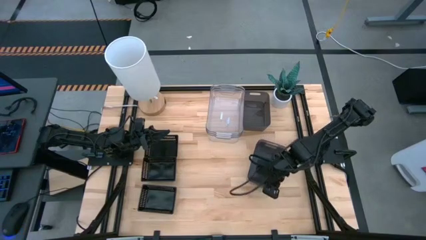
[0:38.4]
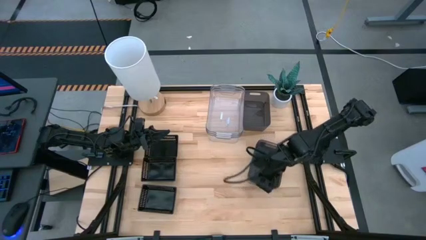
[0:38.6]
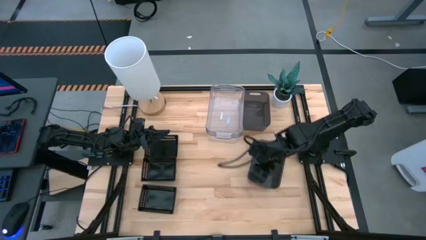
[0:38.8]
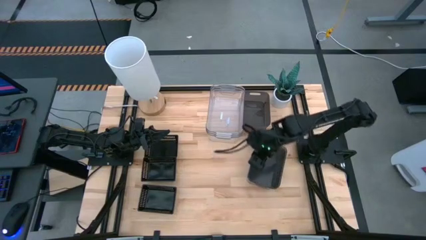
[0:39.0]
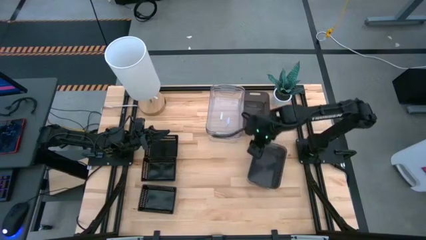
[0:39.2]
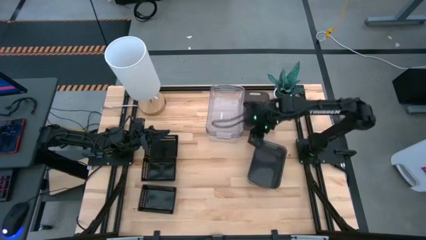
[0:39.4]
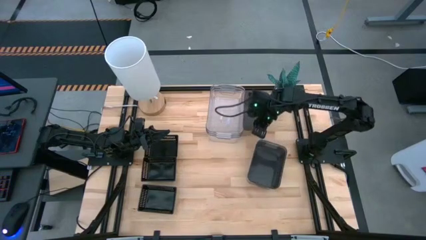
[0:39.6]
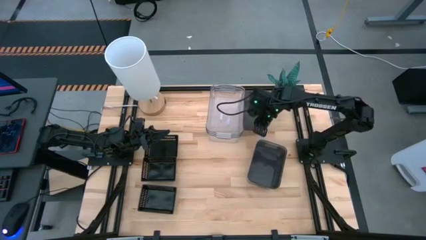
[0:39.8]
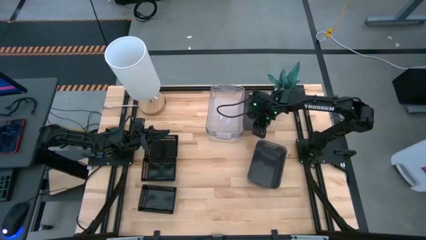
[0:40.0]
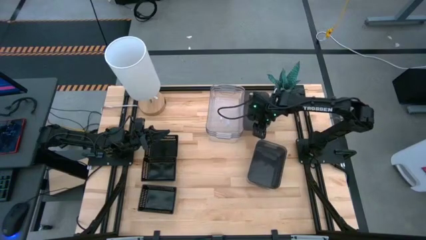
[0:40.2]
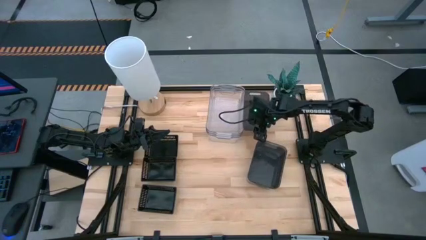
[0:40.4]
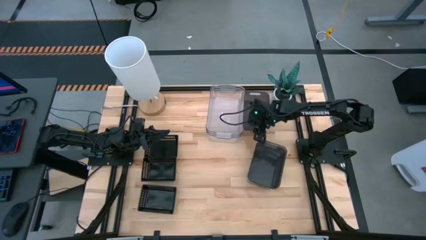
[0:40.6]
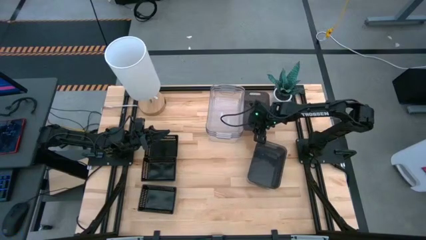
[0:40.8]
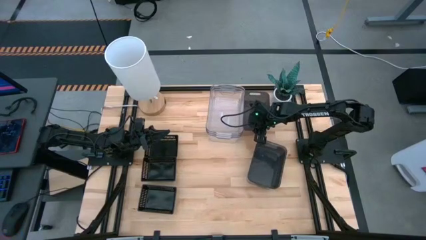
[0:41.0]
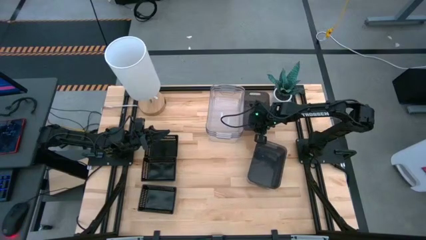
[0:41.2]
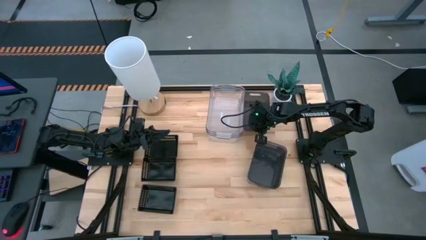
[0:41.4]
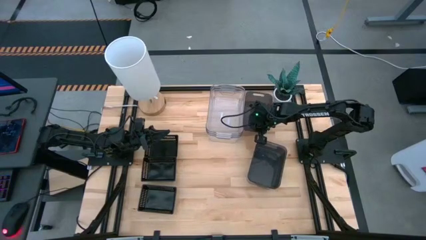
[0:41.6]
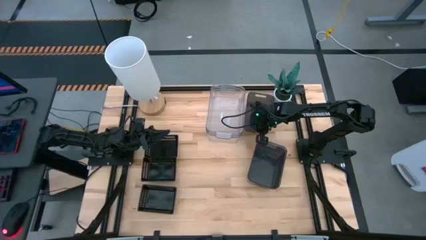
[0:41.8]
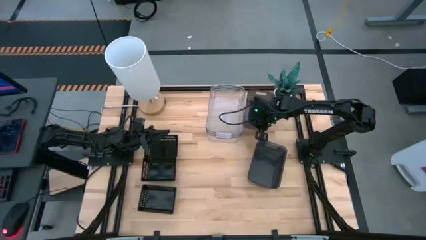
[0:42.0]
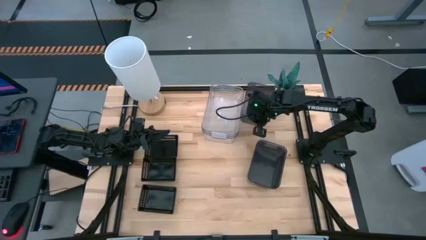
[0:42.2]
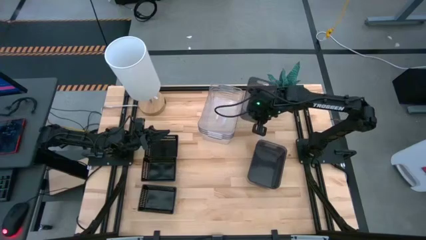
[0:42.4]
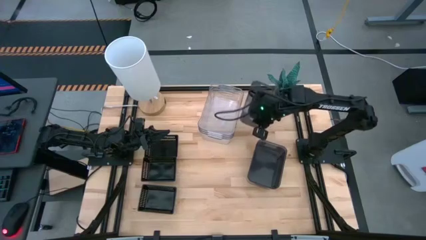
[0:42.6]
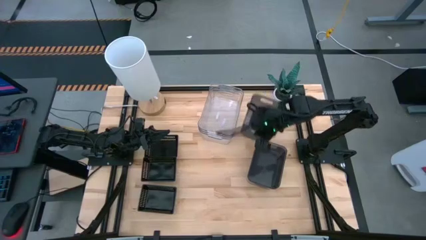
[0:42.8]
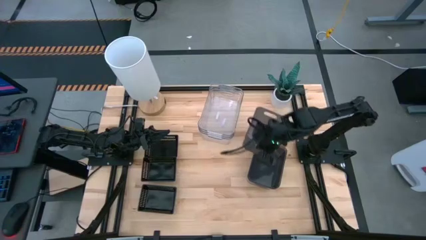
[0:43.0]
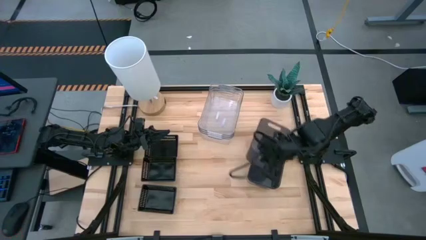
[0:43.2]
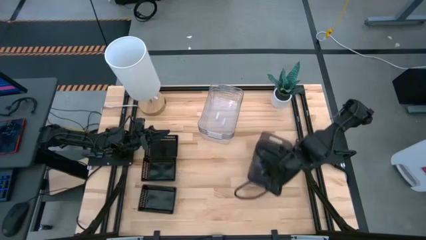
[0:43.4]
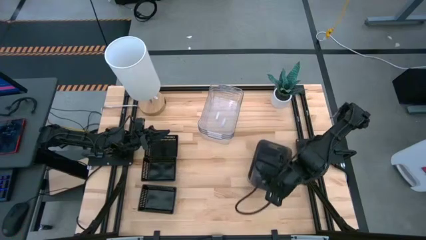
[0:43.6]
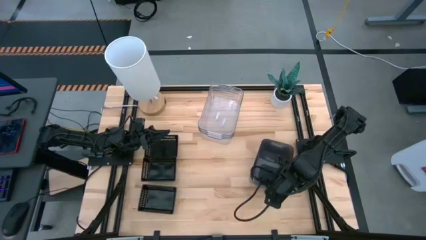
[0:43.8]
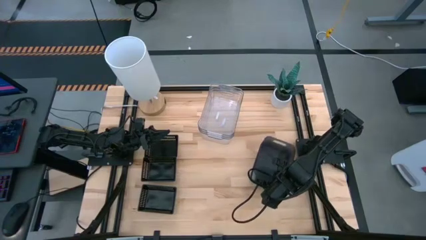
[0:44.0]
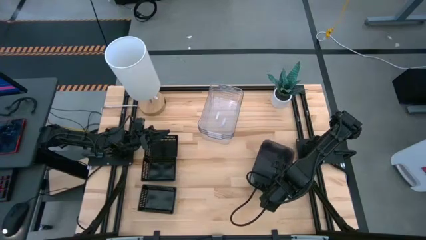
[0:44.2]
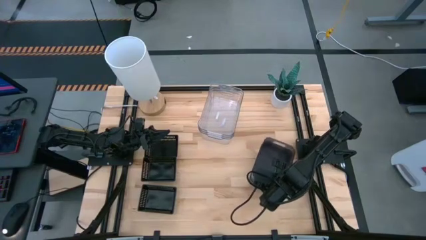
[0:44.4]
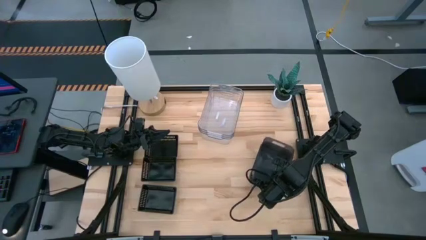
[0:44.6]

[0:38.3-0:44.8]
Stack the top black bin on top of the bottom black bins

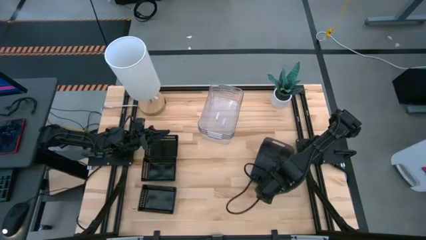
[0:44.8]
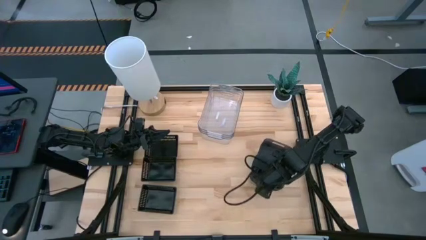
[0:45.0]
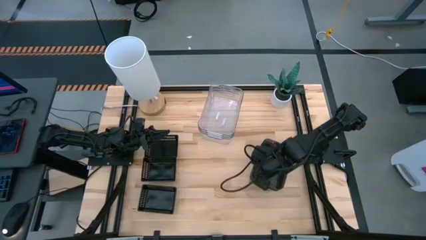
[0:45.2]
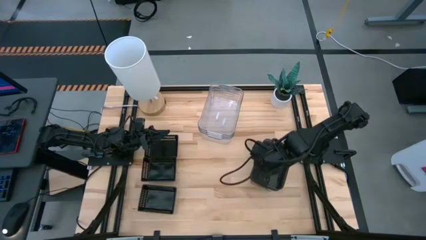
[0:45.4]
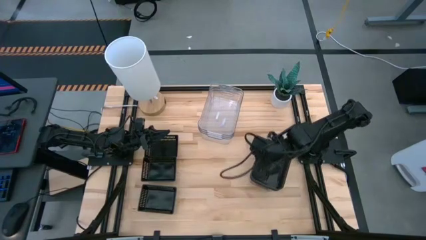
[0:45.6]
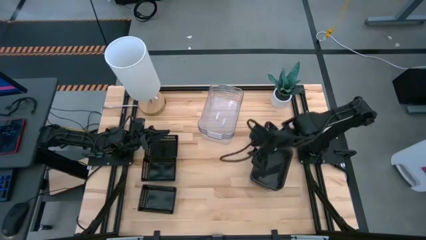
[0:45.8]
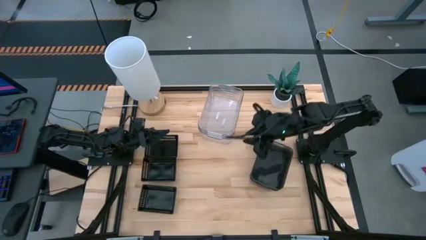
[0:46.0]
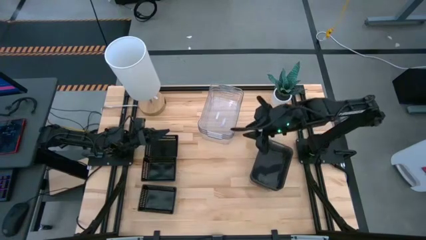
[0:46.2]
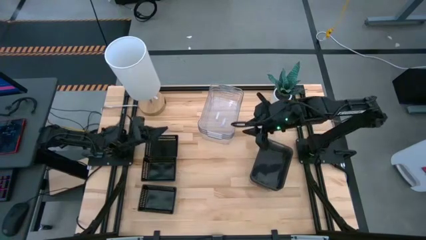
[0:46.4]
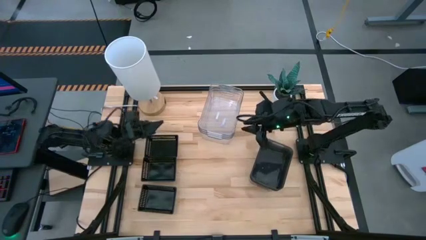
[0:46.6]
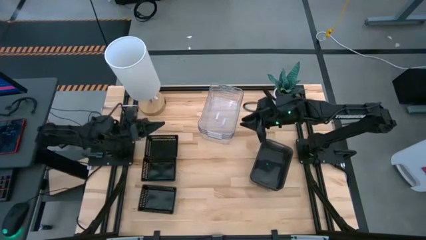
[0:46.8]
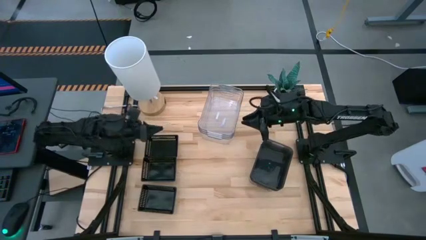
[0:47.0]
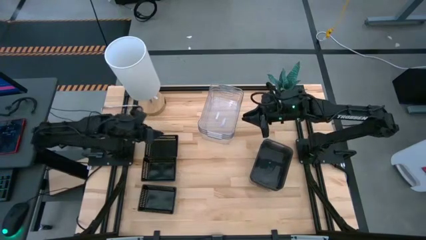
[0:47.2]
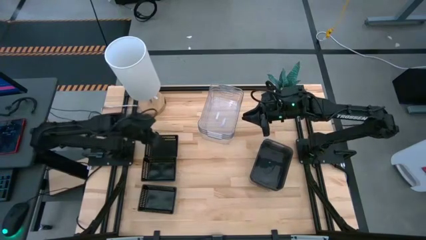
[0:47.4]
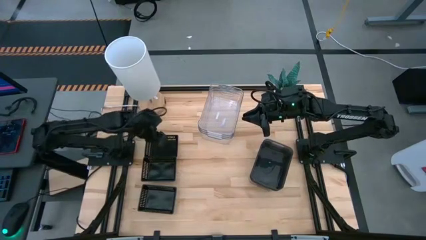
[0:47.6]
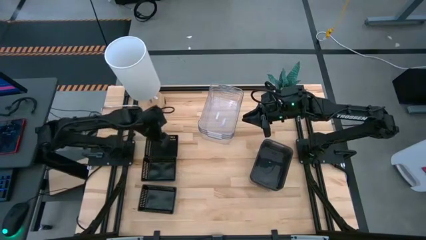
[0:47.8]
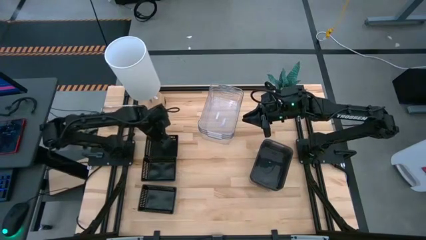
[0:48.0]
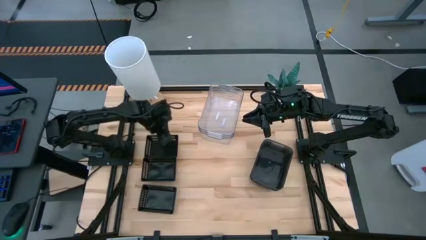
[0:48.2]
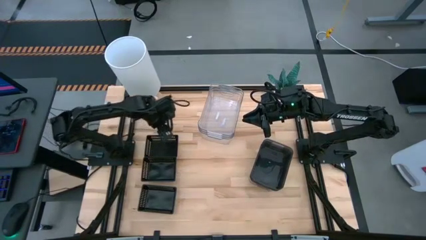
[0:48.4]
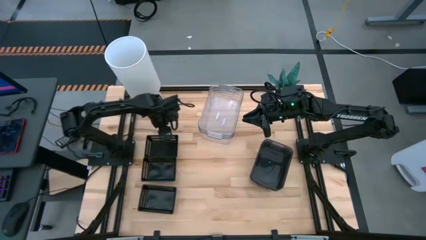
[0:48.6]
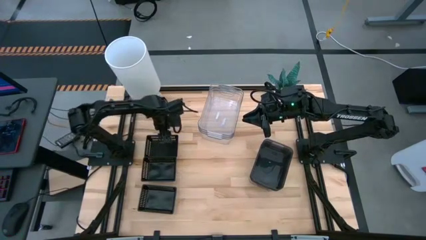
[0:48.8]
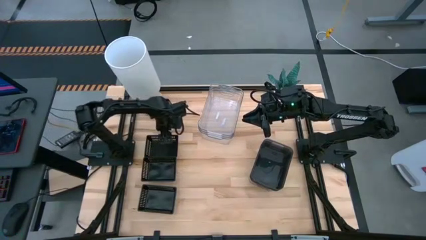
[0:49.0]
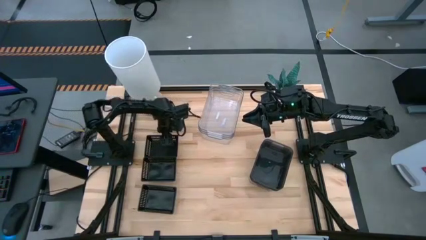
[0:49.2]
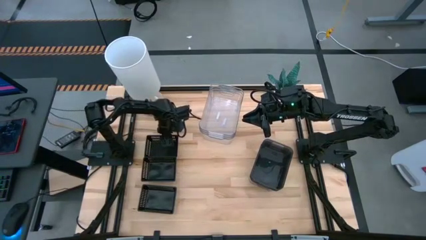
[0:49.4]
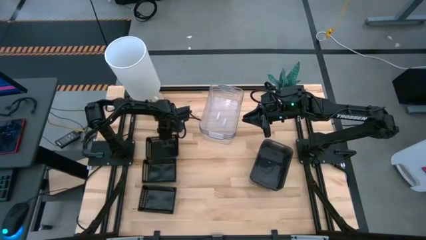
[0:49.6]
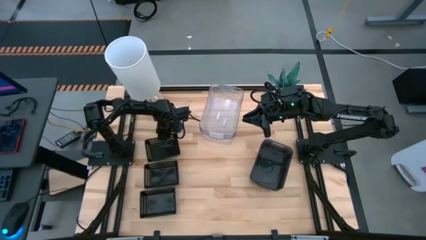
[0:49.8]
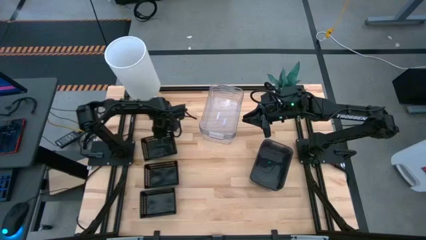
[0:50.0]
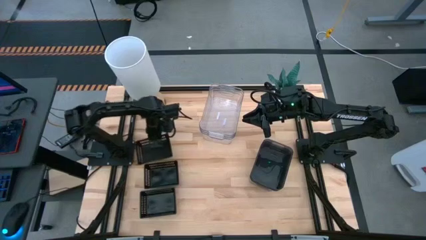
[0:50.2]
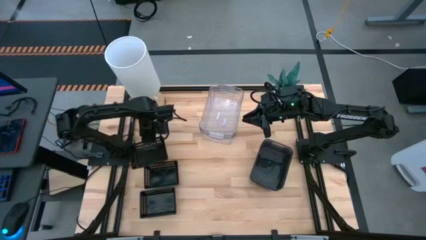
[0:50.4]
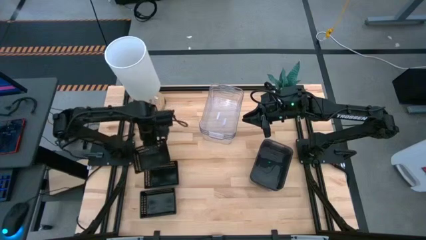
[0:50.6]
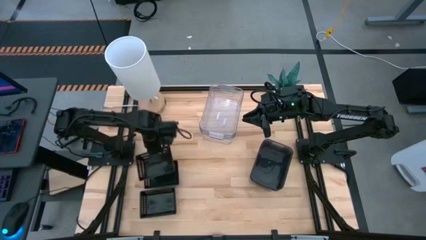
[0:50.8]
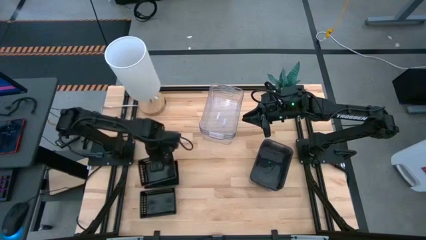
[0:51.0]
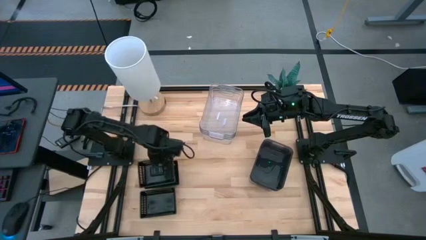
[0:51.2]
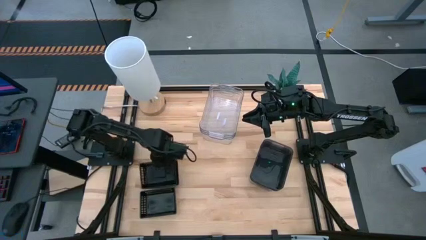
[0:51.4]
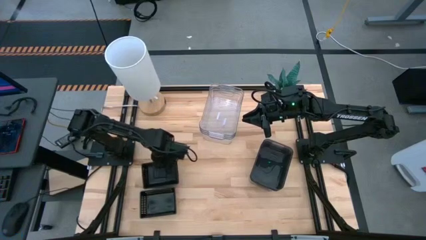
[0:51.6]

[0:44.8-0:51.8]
Stack the top black basket on top of the middle black basket

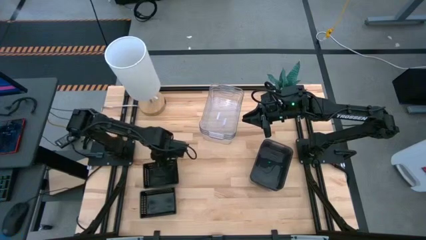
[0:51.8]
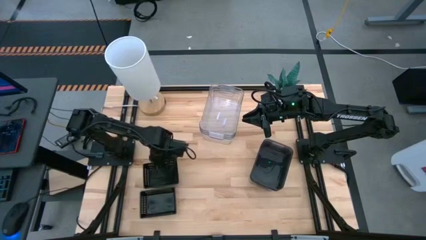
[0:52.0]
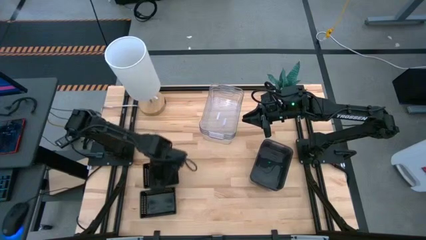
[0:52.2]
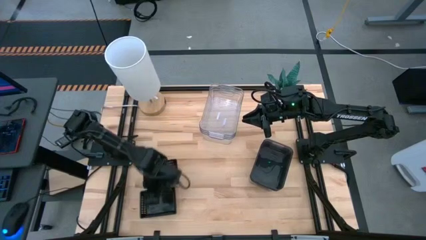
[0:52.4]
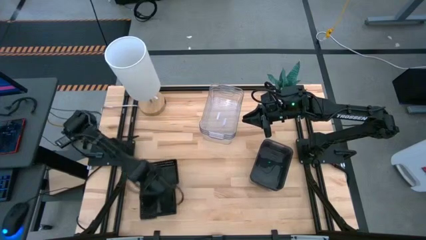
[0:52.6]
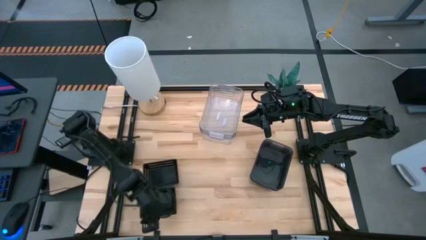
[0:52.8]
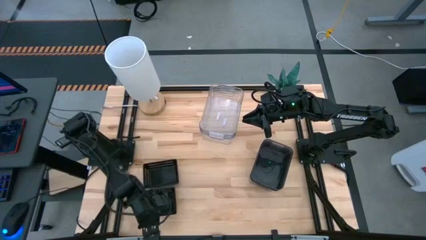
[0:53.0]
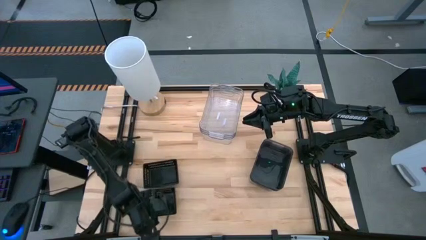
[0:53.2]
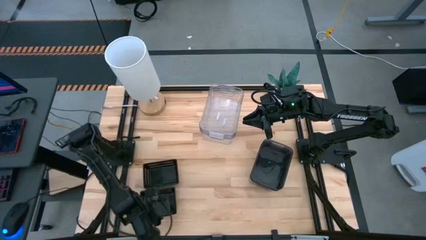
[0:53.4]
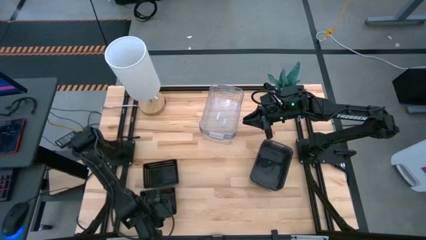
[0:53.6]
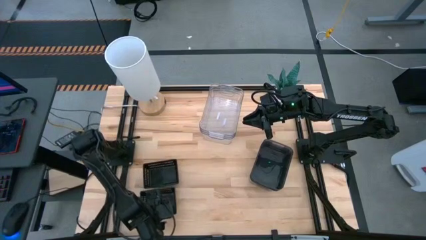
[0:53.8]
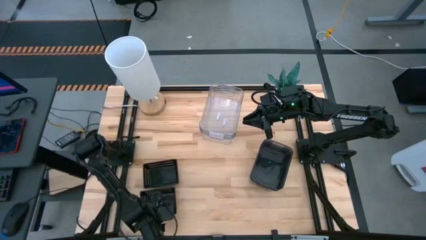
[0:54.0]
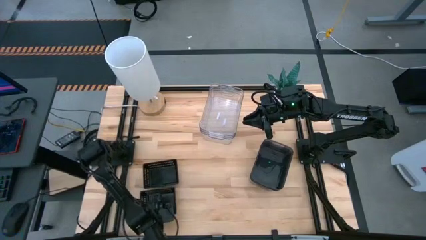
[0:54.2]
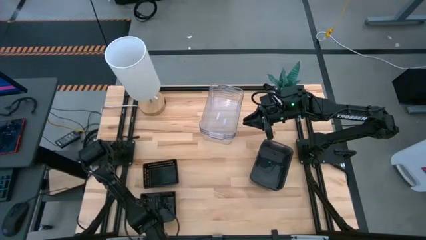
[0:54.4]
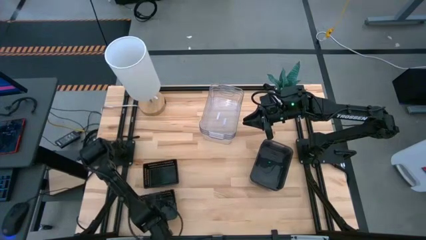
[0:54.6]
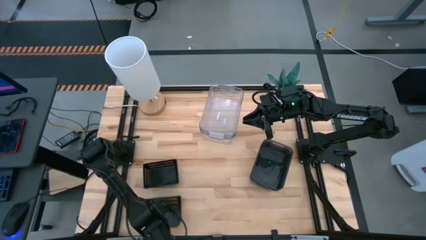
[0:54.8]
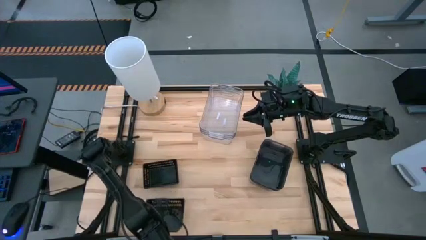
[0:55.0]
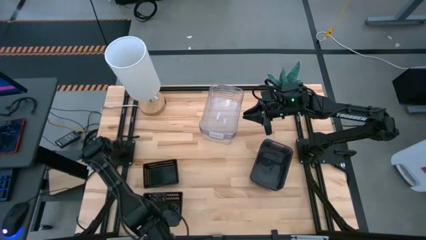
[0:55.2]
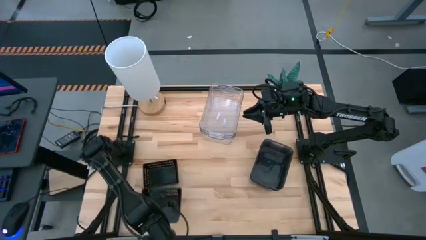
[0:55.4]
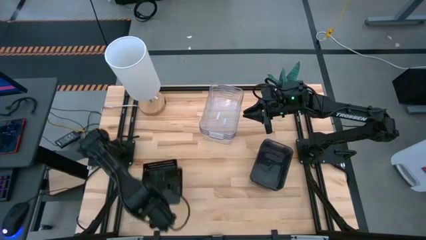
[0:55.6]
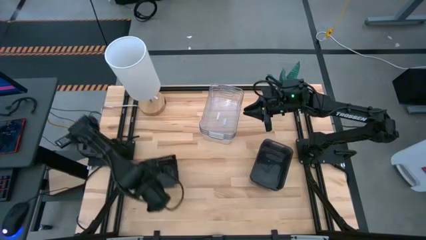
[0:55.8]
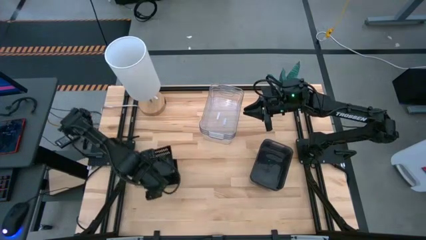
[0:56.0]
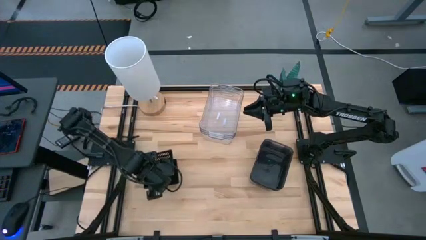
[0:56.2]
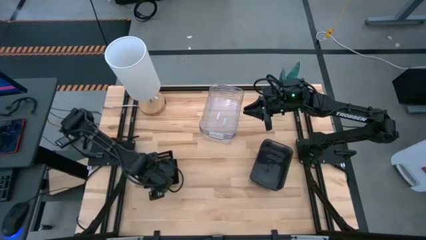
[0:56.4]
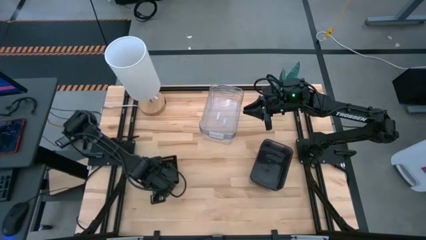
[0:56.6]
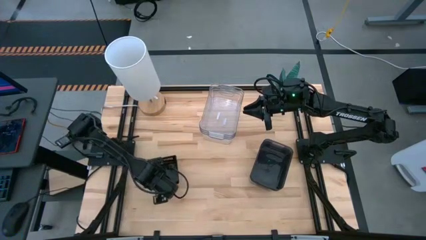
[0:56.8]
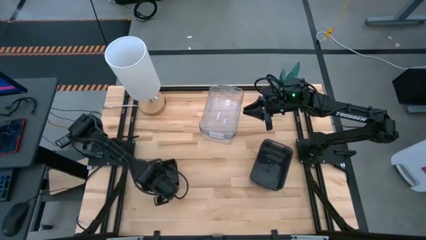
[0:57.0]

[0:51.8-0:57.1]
Stack the bottom black basket on top of the top black baskets
